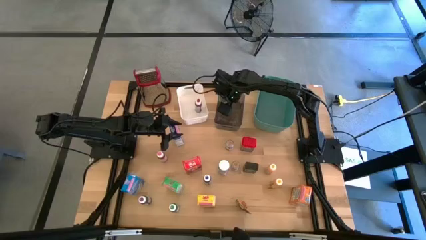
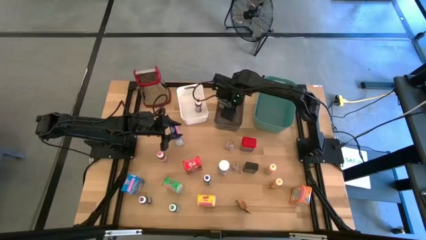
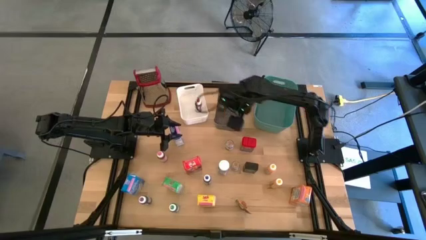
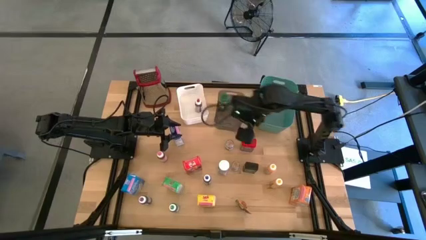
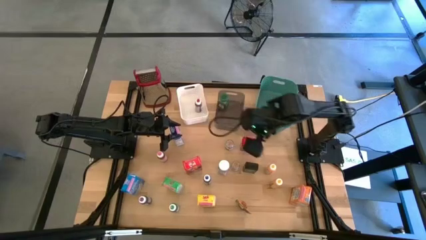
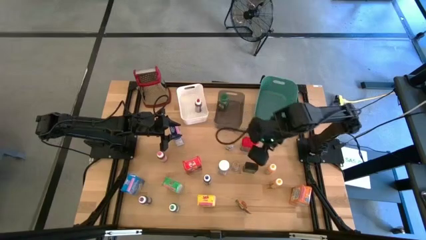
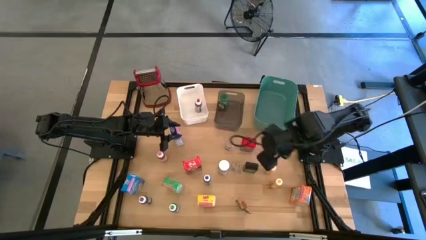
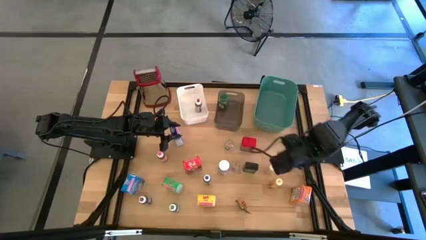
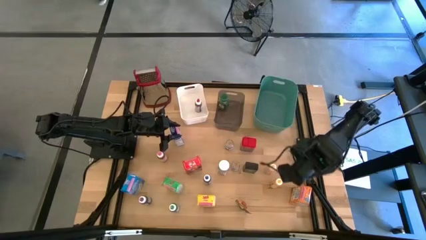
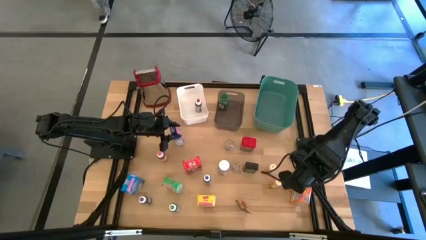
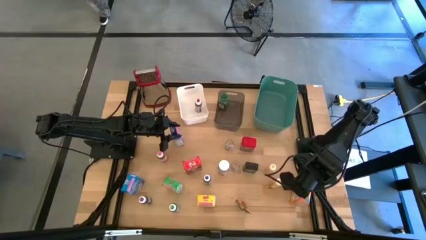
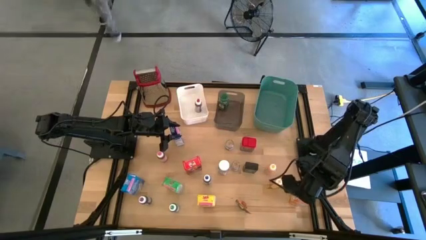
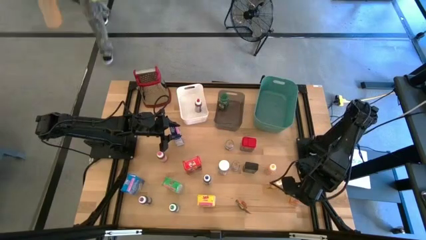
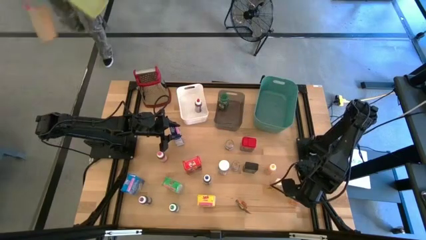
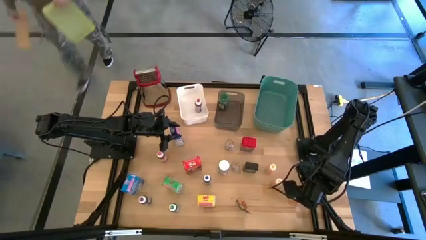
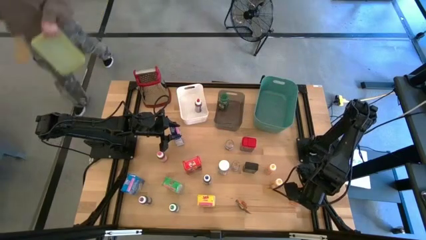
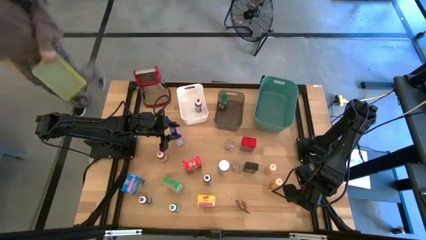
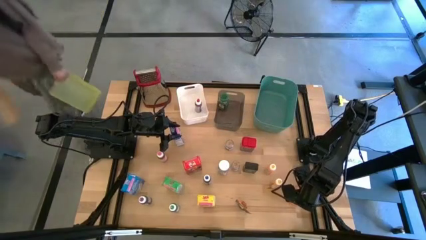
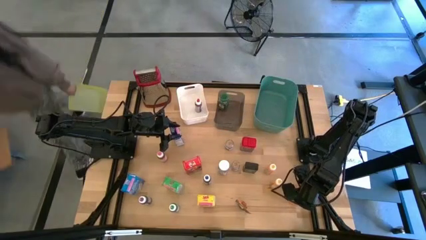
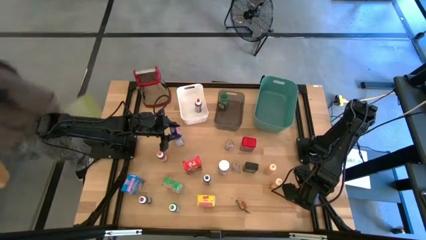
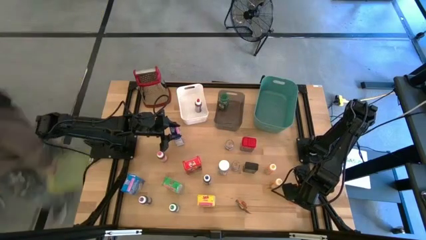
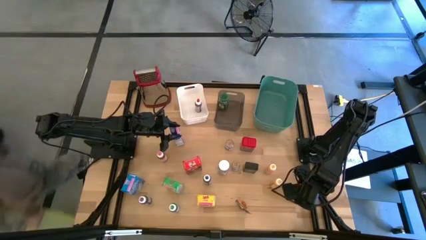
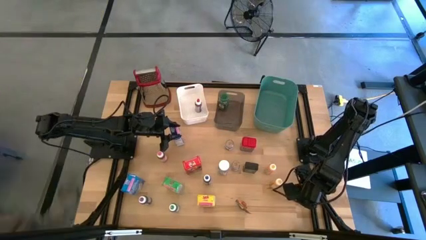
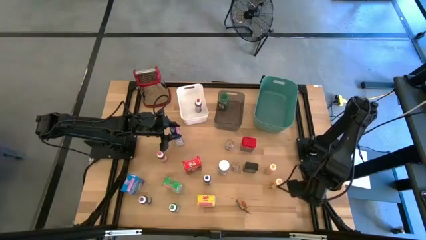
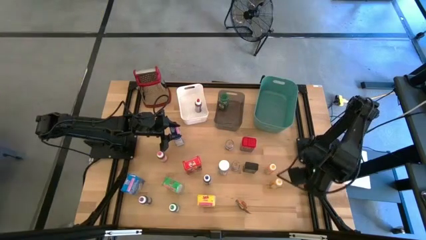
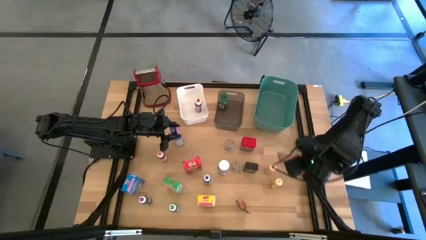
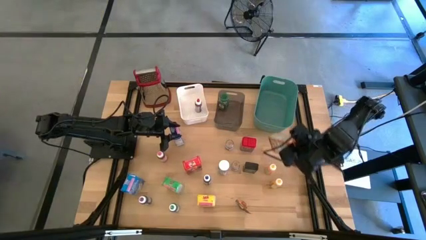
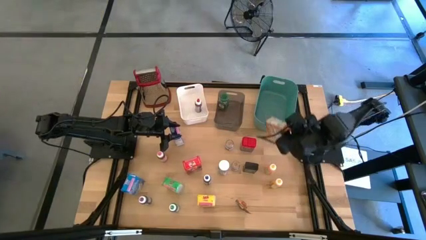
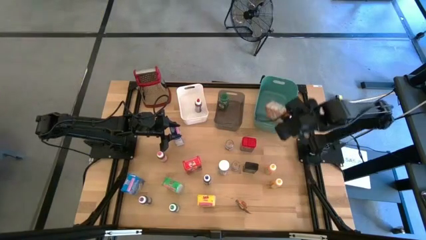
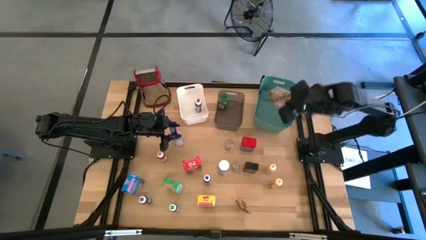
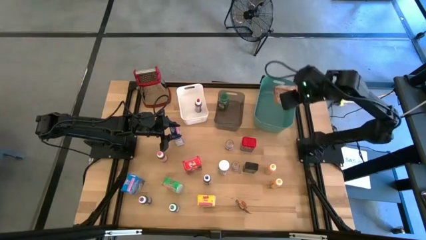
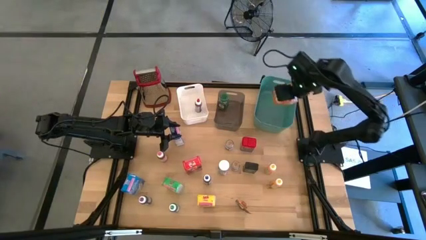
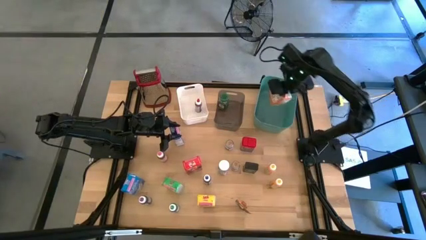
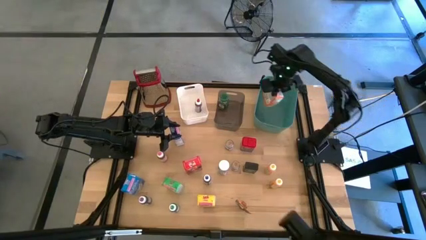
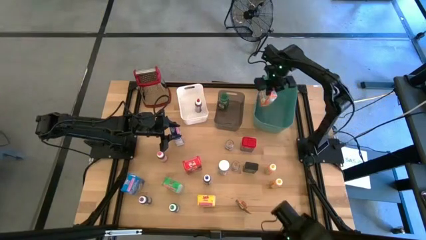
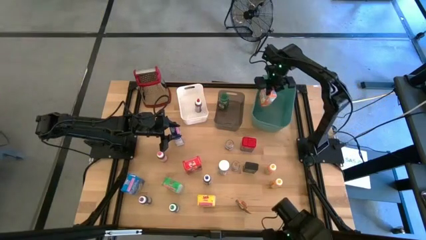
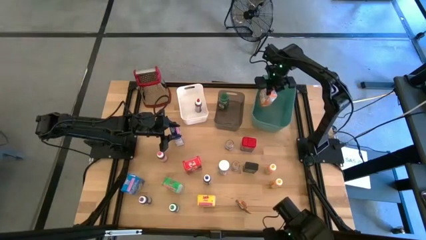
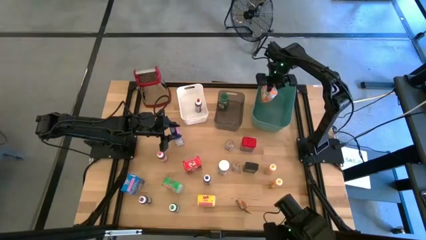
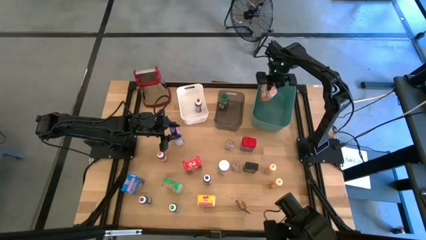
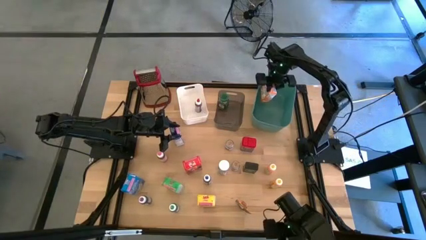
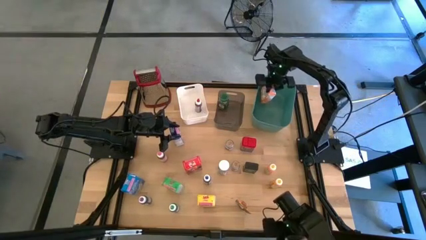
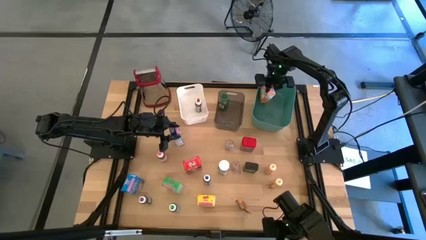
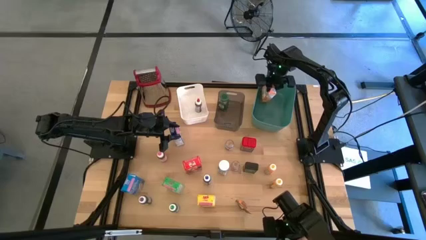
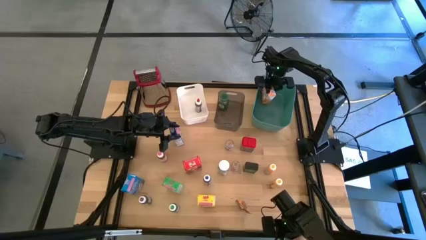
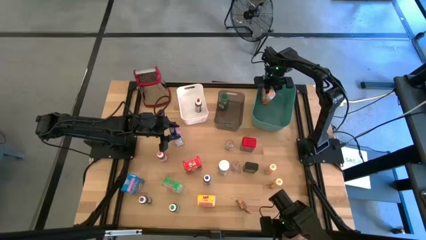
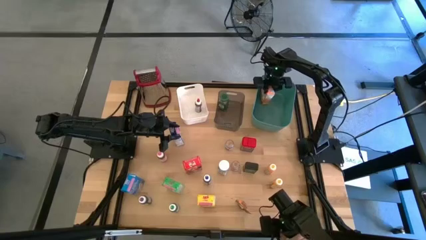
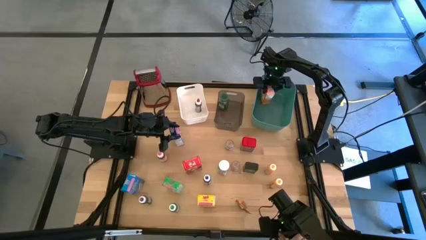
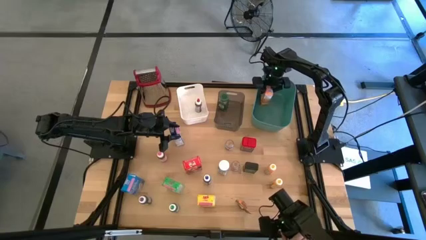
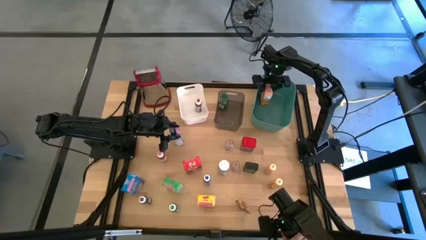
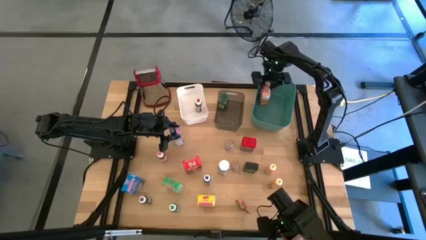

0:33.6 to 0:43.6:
Task: Pick & Place Kitchen Items
Put the orange cereal box into the green bin

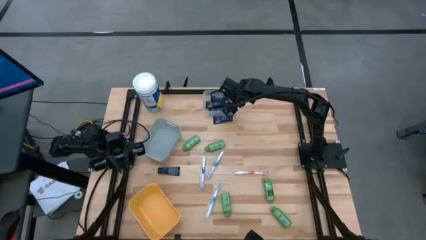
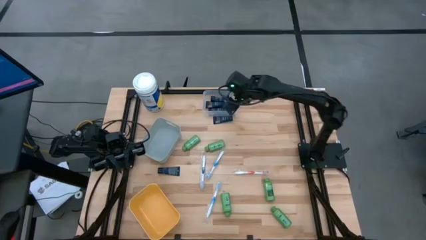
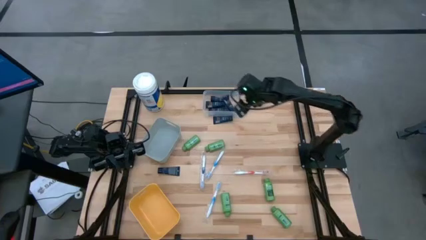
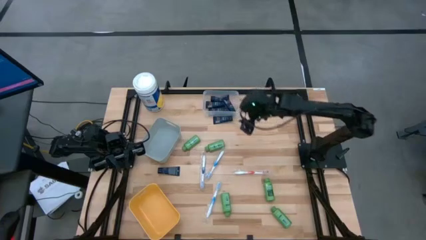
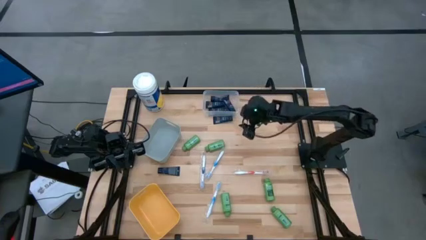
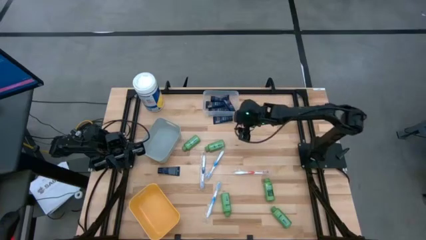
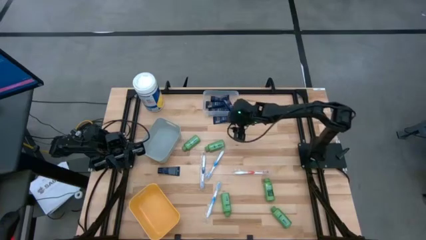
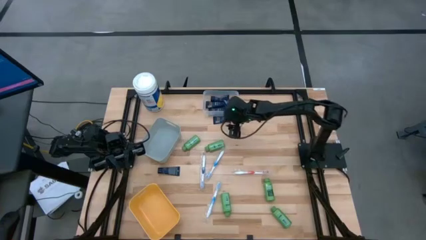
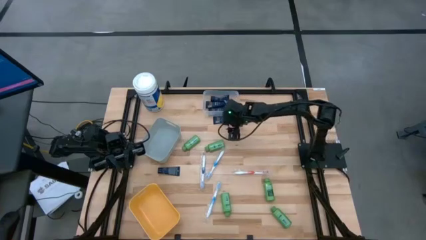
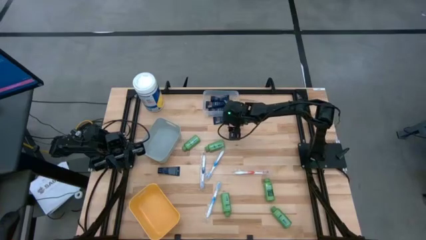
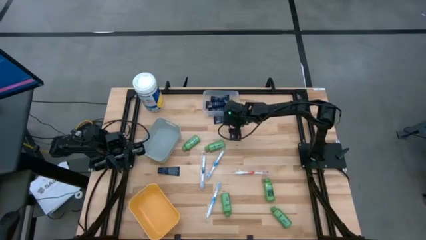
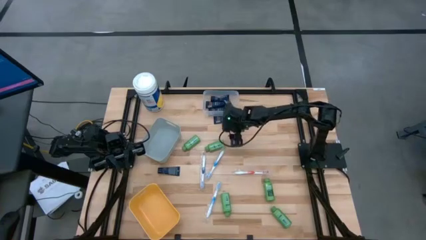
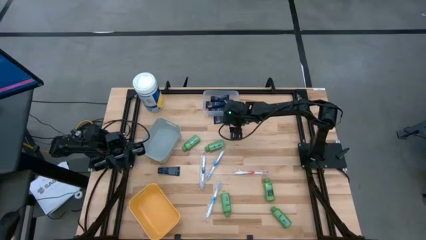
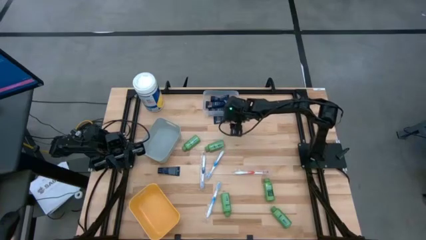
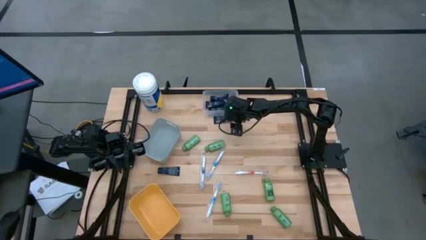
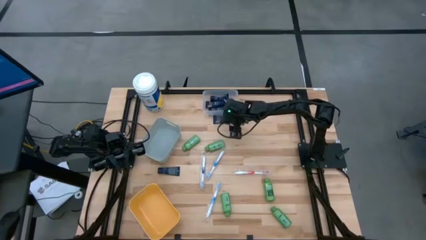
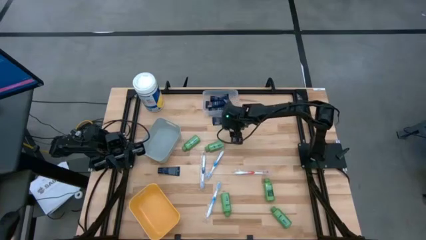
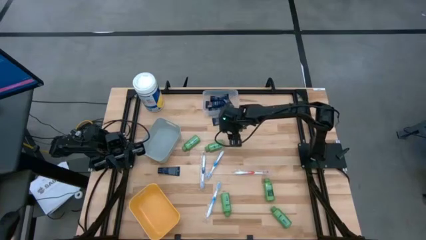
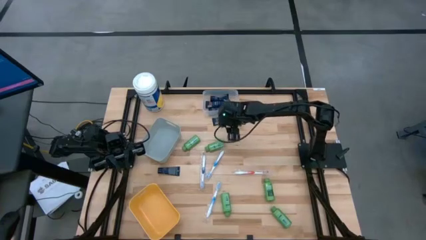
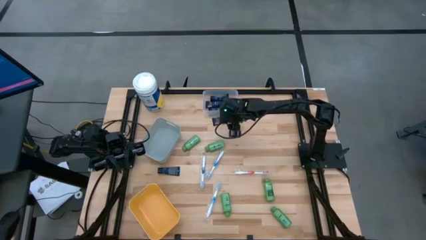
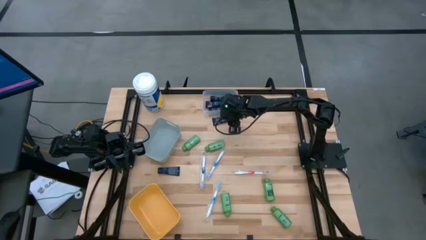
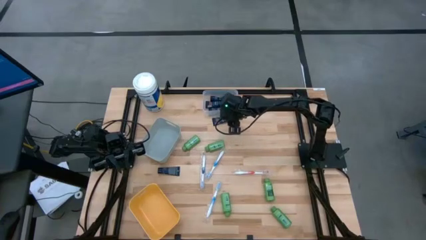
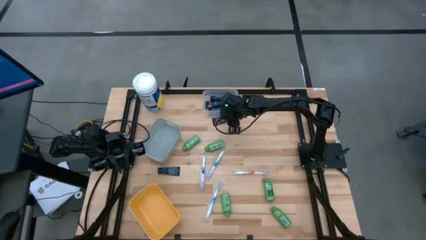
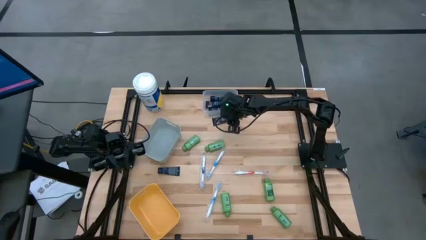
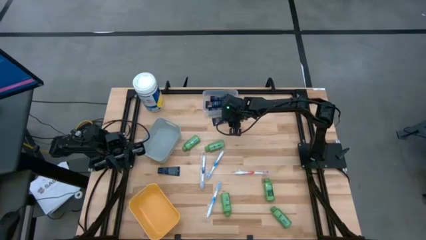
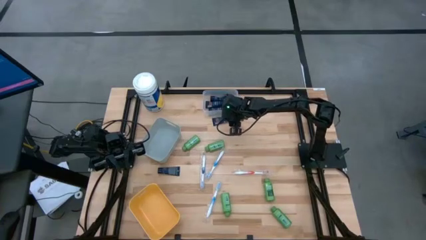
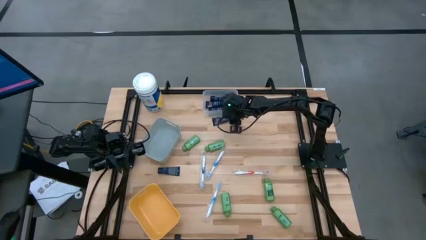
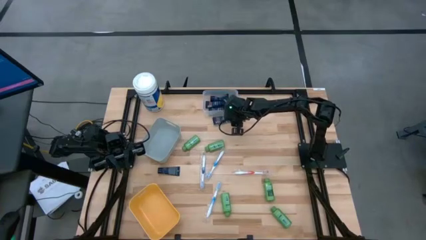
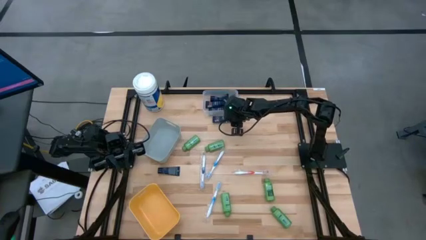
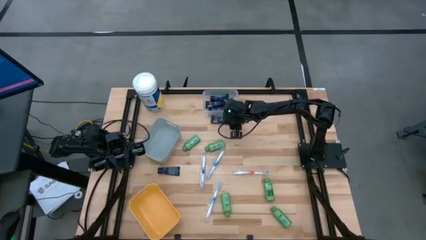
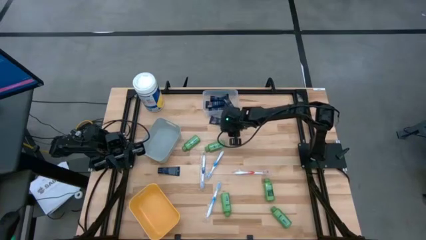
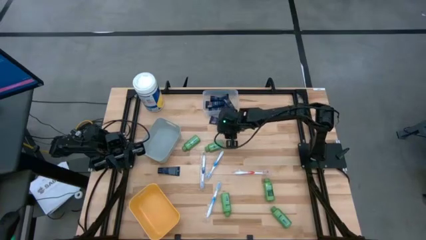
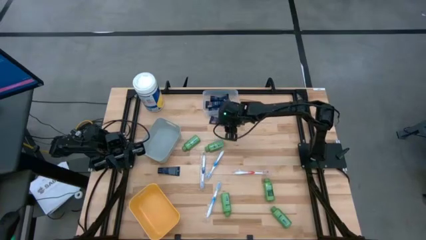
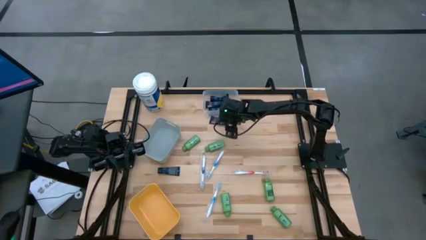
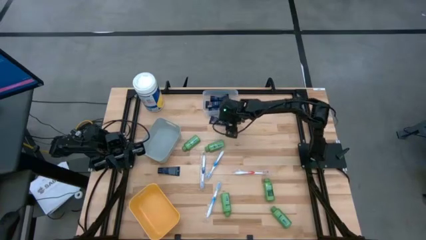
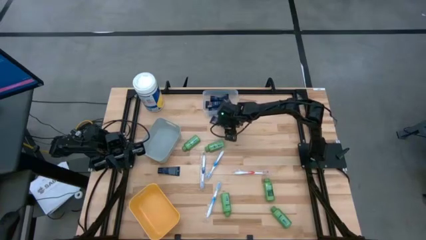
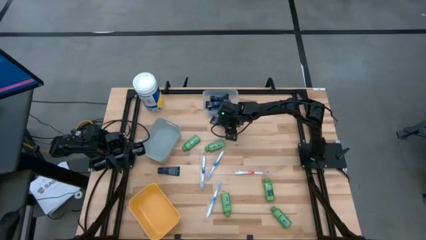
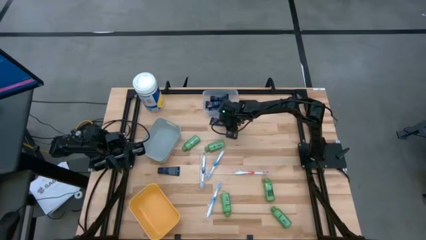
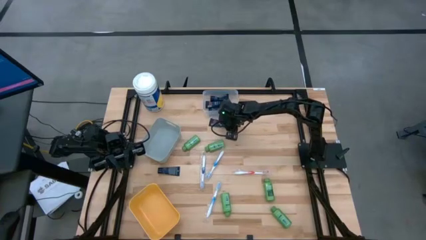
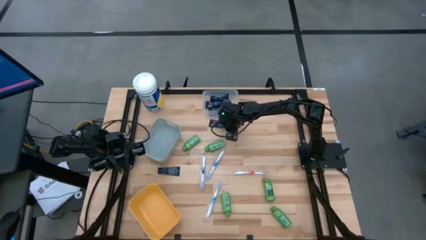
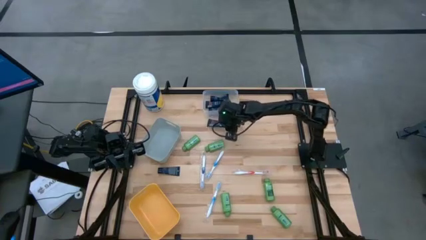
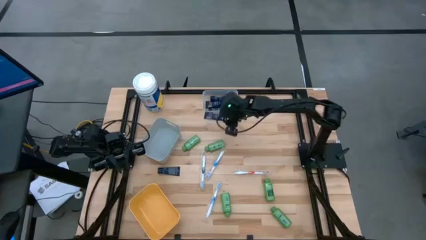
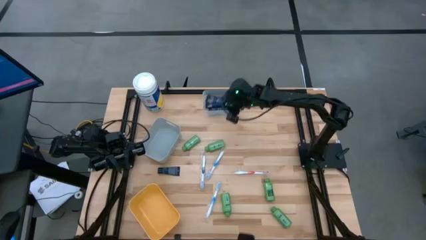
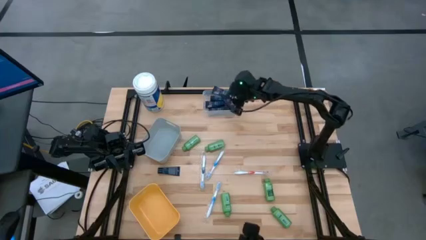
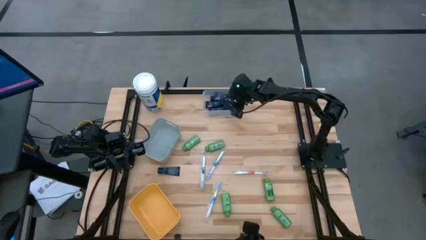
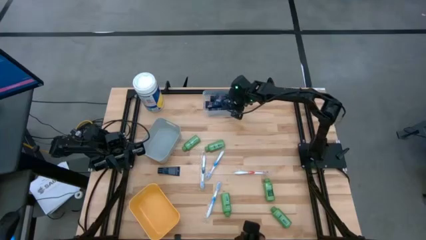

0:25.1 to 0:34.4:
Task: Pick & Place Travel size toiletries
Put the blue shave cream into the transparent bin
